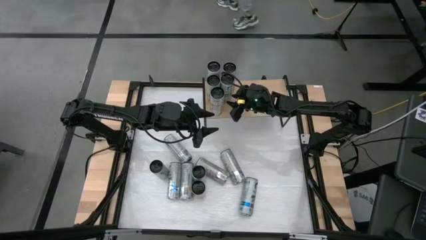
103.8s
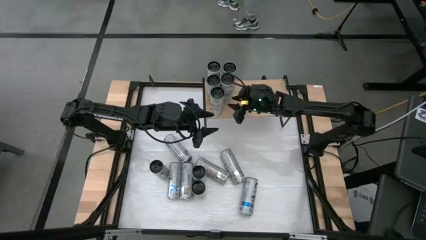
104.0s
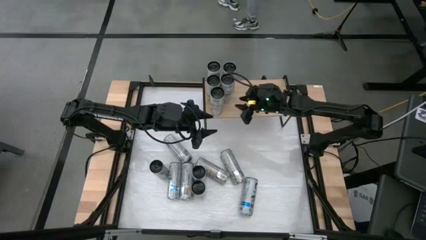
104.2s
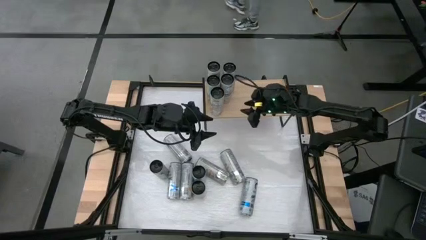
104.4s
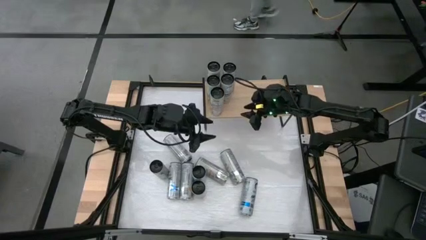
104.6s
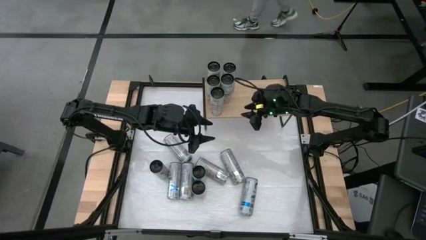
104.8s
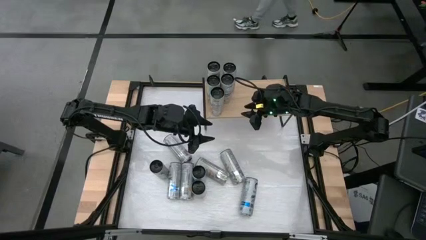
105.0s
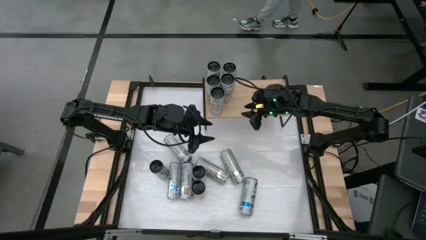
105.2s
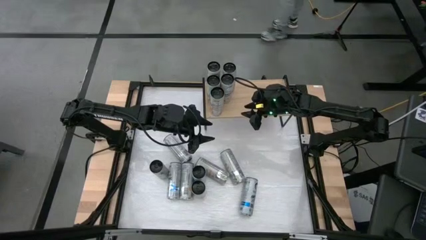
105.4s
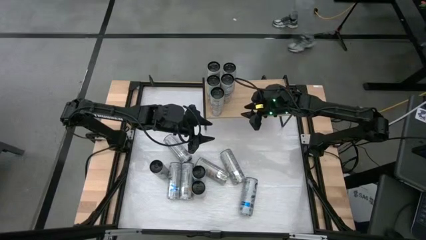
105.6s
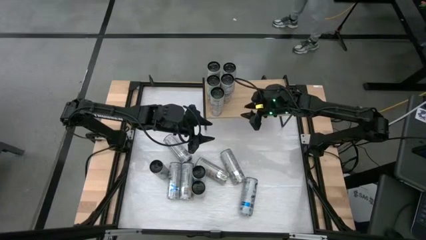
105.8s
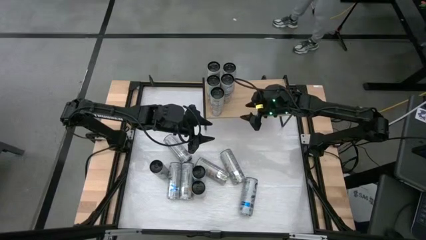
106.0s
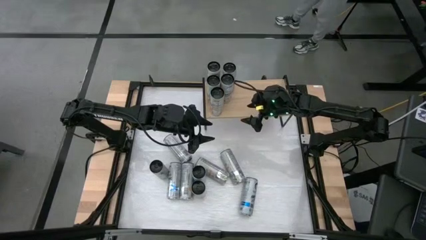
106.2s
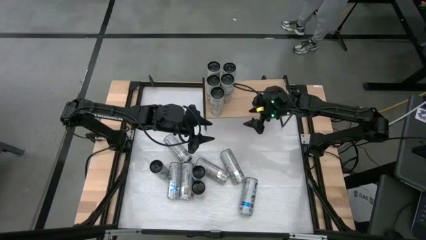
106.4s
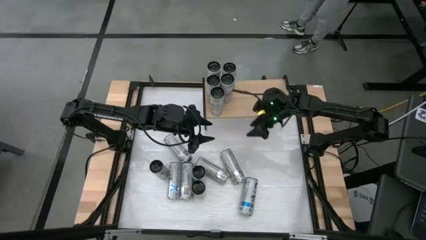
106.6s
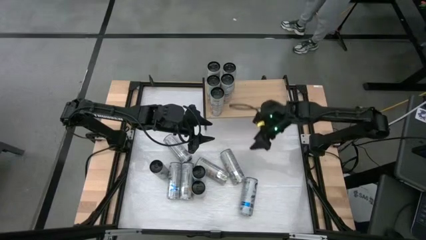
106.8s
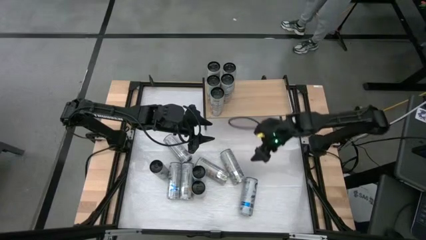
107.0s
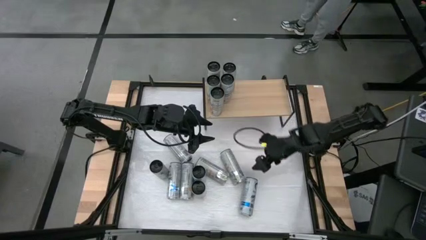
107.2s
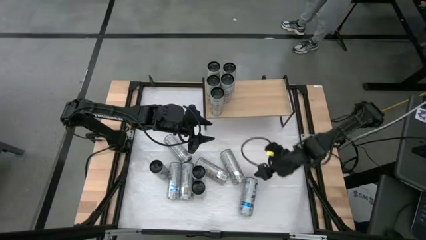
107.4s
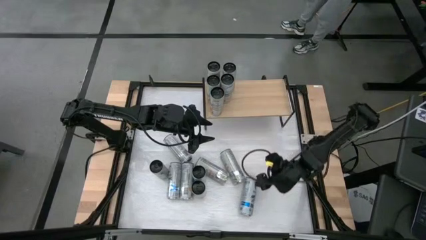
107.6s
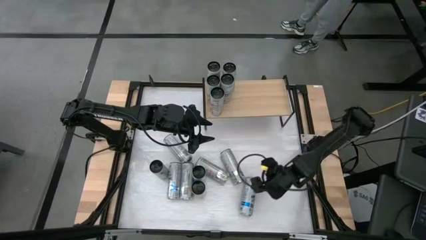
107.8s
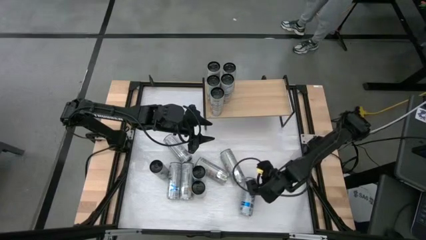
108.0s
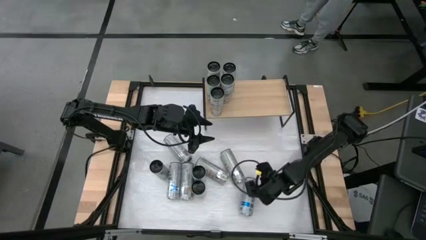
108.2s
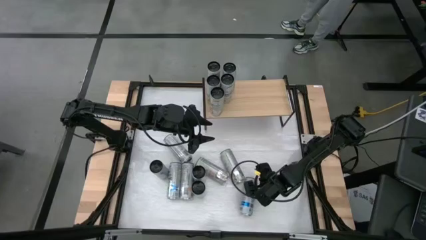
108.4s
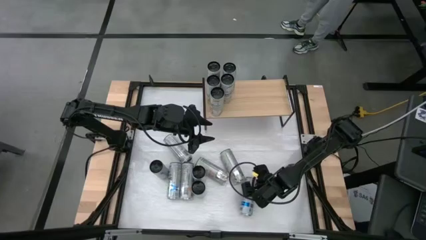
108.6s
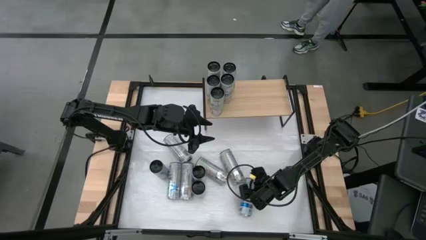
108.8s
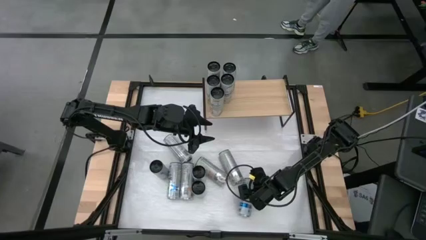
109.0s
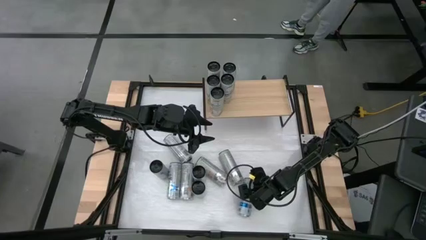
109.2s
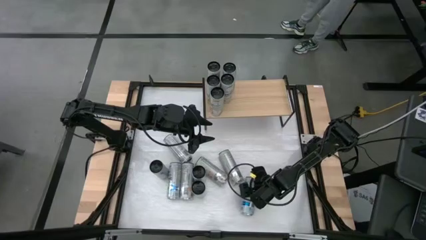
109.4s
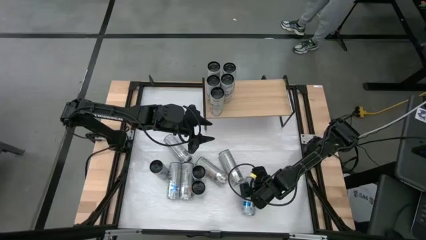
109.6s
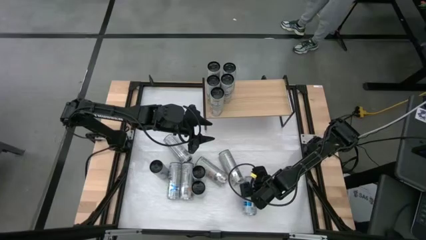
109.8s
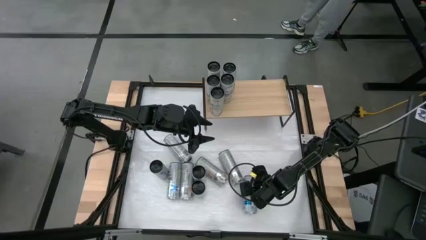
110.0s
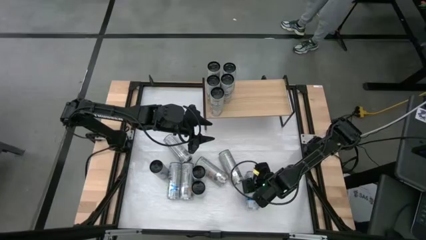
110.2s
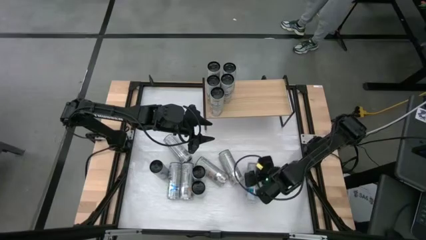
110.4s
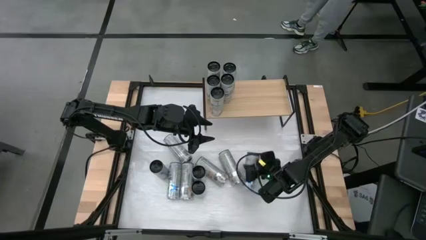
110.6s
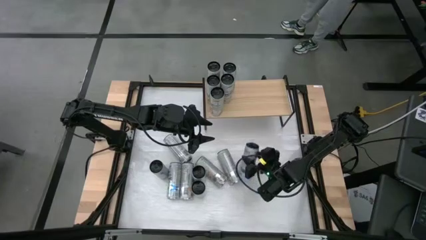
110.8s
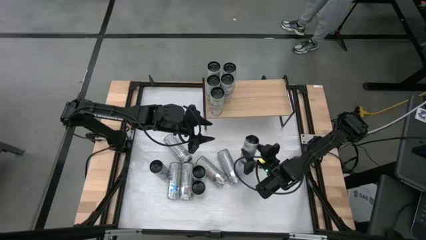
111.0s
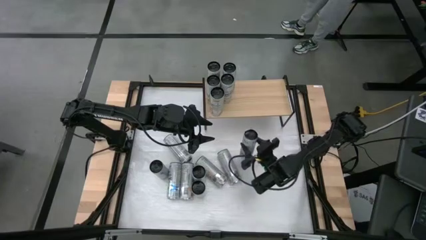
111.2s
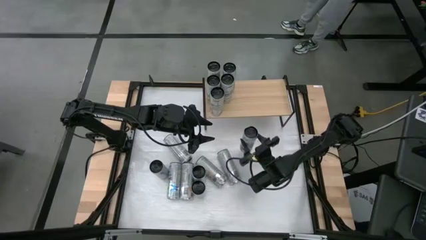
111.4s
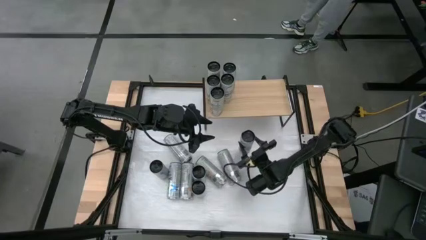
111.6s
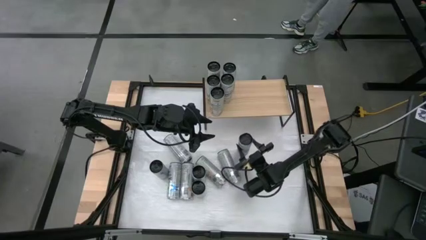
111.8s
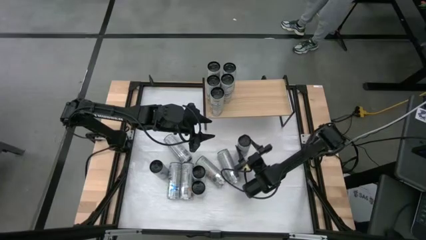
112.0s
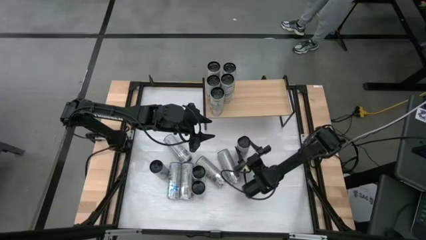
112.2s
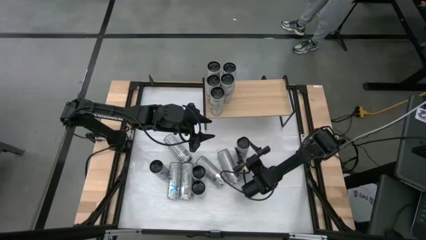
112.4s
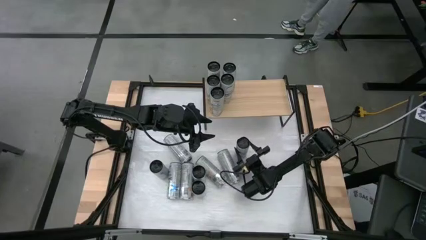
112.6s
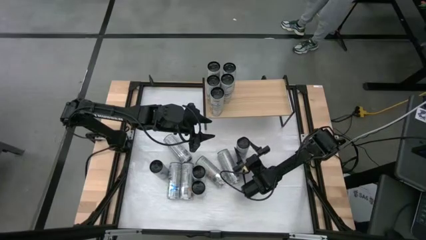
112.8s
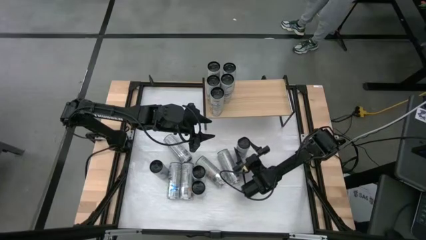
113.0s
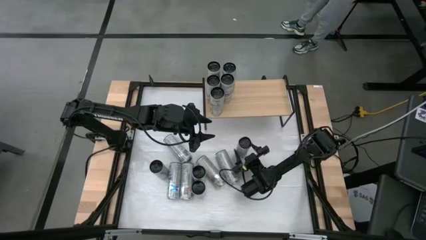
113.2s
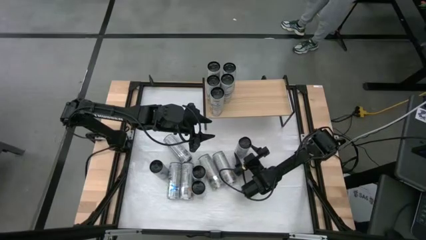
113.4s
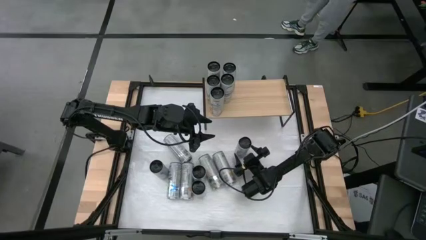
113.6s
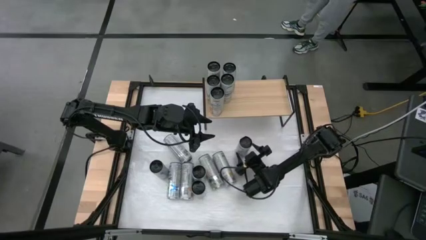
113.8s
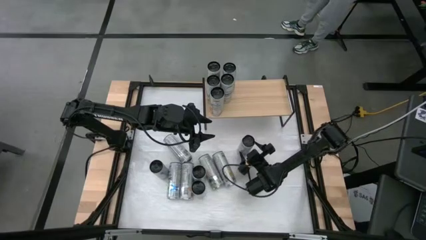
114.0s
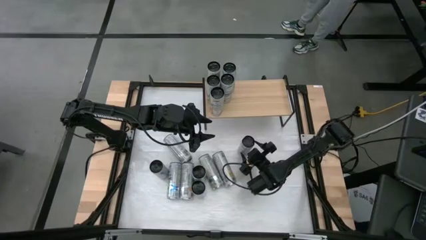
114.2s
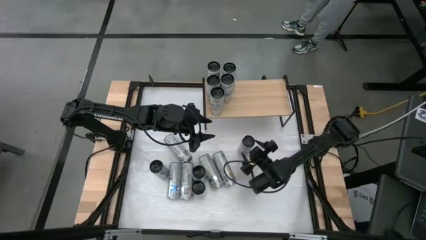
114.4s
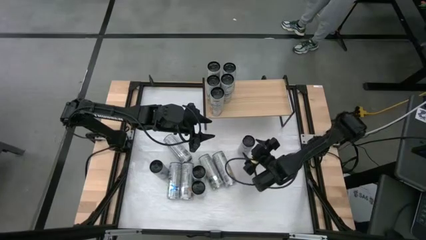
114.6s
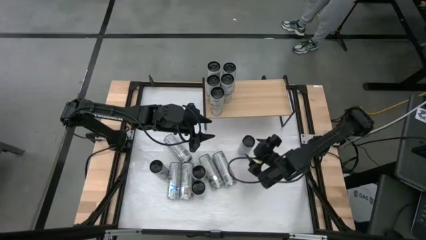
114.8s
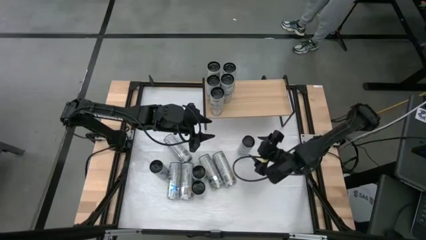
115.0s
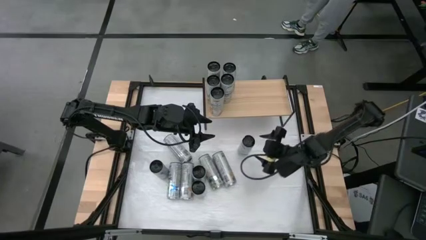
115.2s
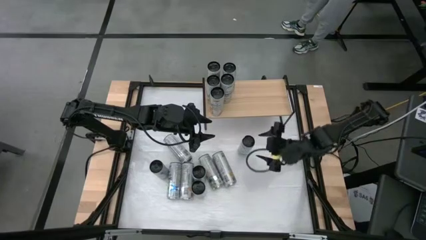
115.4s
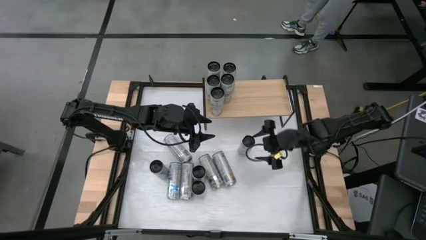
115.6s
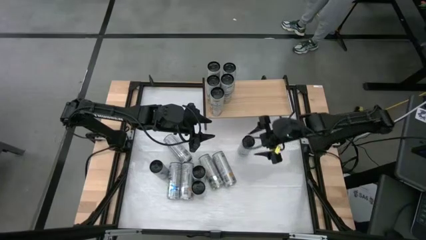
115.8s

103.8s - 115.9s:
Task: Place canned beverage on shelf
Put the left blue soda can on the shelf aligned with the other blue soda cans

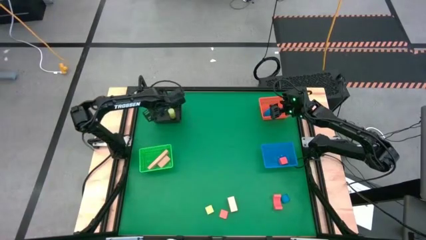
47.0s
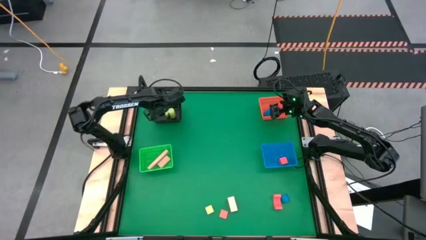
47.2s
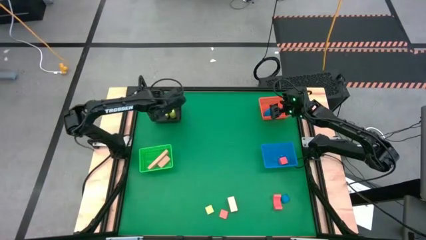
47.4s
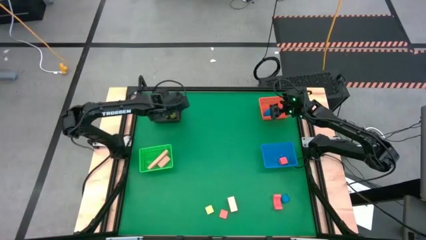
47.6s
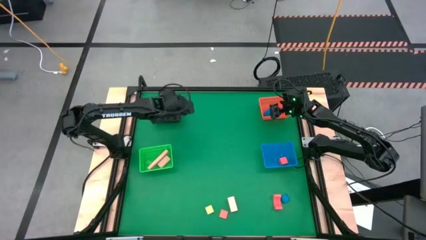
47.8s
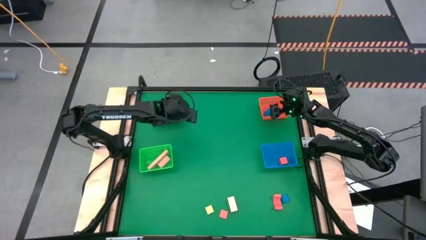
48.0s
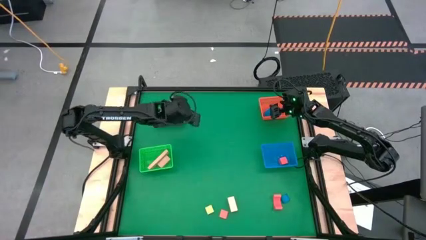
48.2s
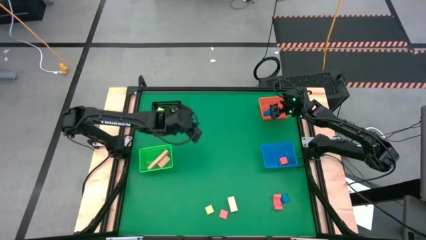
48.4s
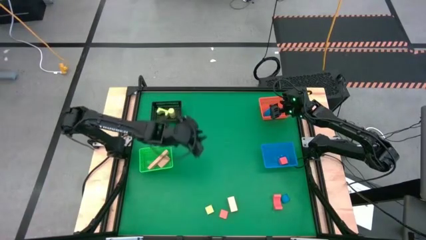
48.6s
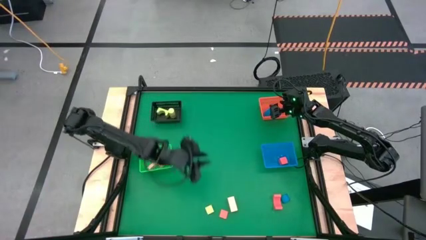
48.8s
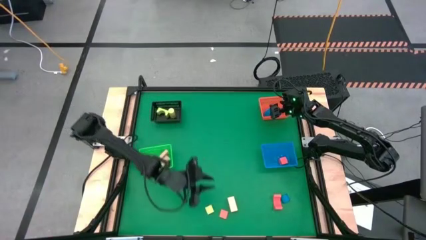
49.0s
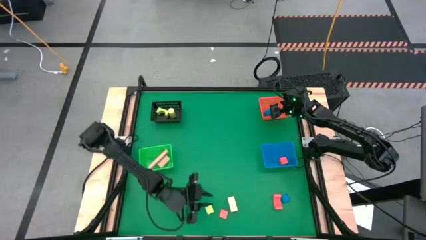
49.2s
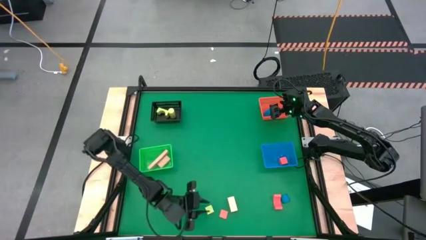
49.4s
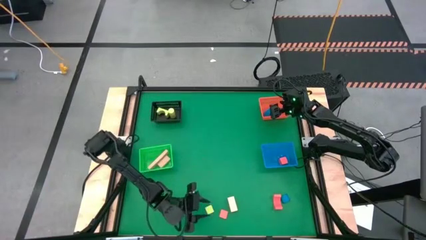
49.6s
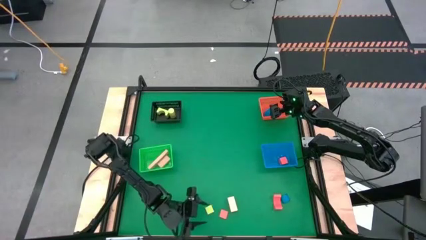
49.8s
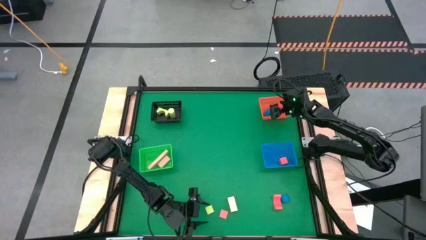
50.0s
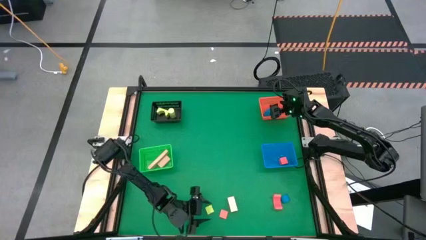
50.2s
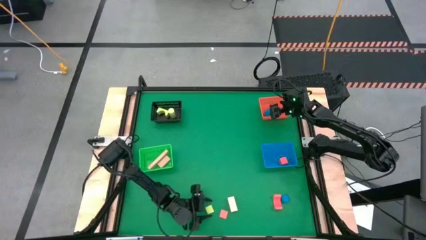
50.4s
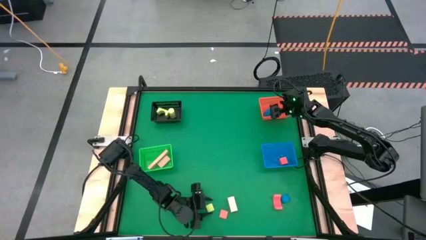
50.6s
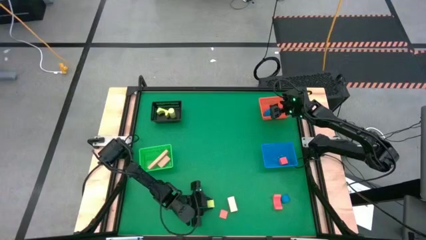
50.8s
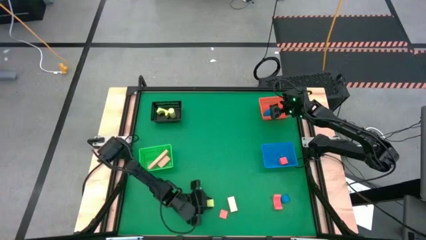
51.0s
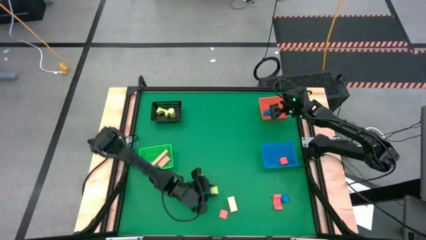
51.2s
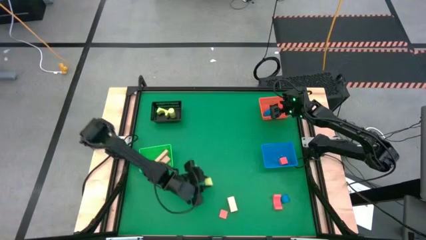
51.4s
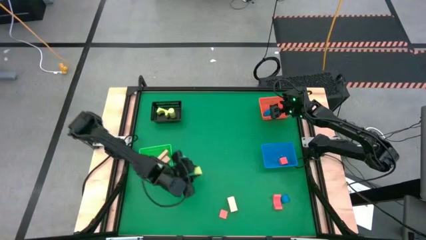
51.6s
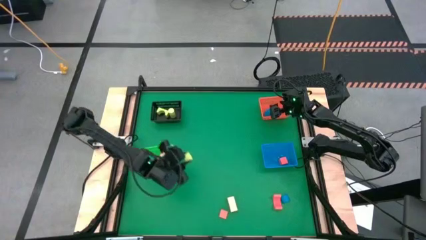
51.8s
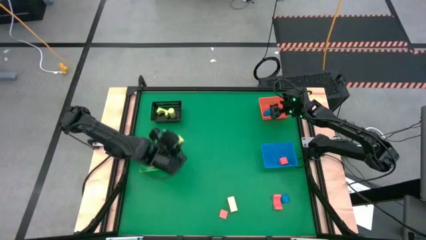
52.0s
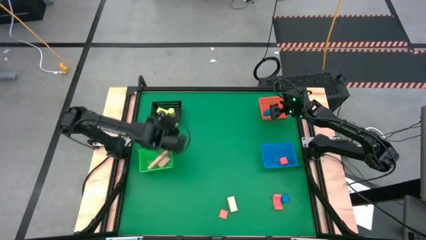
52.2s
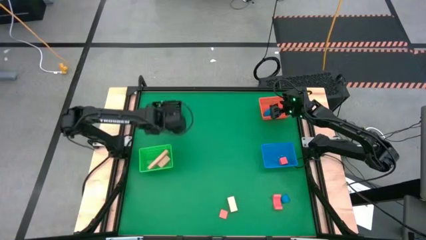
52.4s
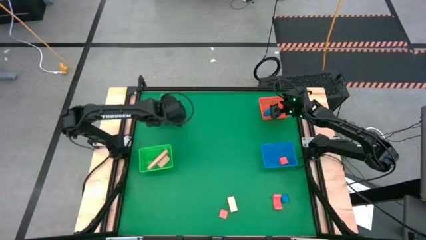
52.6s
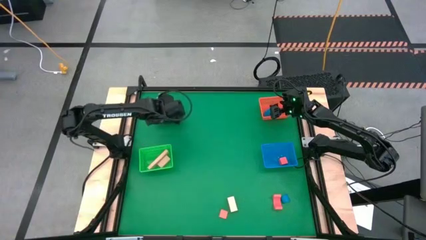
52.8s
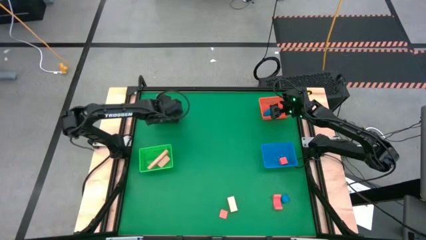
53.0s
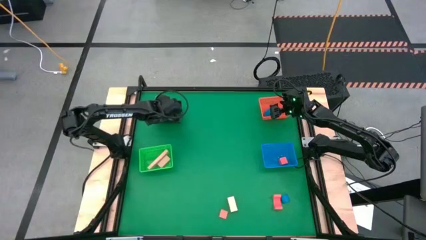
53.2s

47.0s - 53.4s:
Task: Sort & place blocks by color
Put the yellow green block into the black bin
